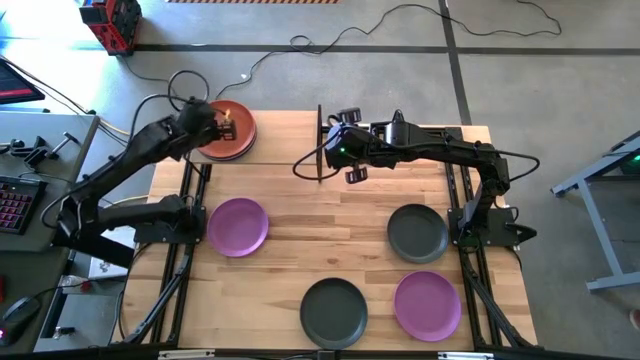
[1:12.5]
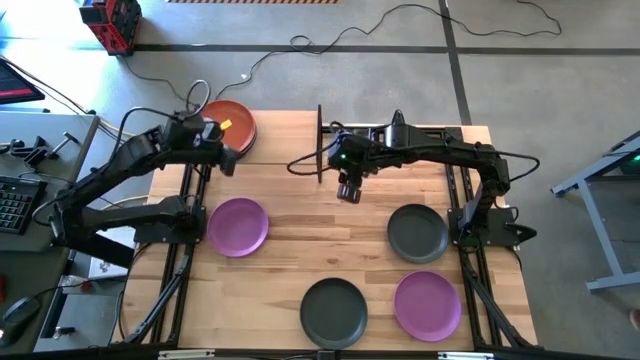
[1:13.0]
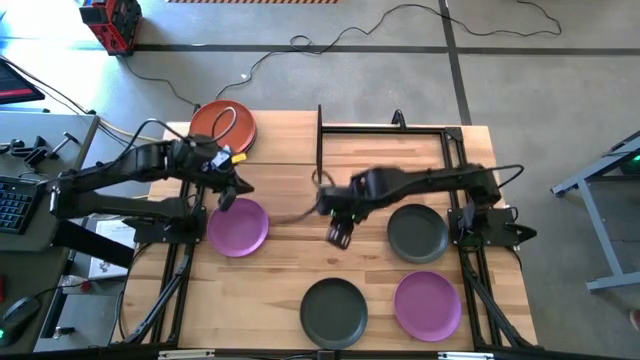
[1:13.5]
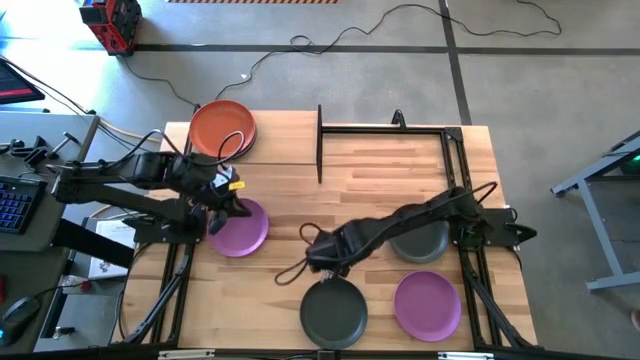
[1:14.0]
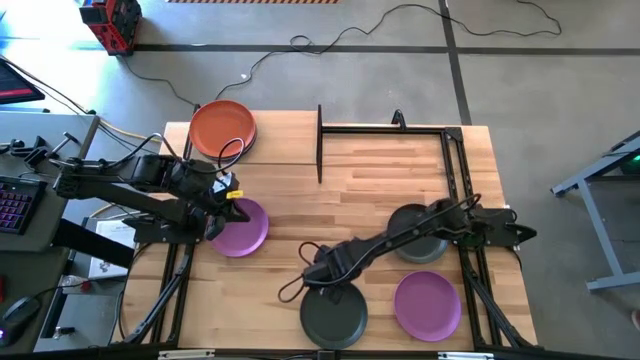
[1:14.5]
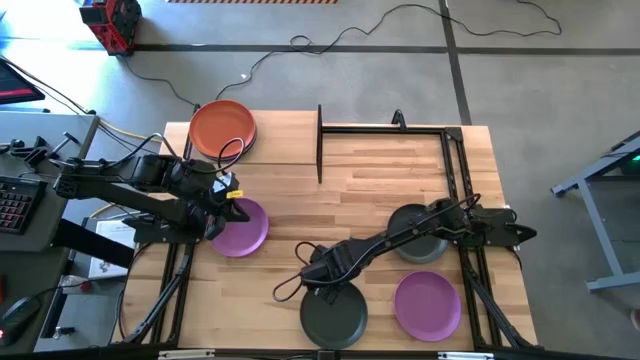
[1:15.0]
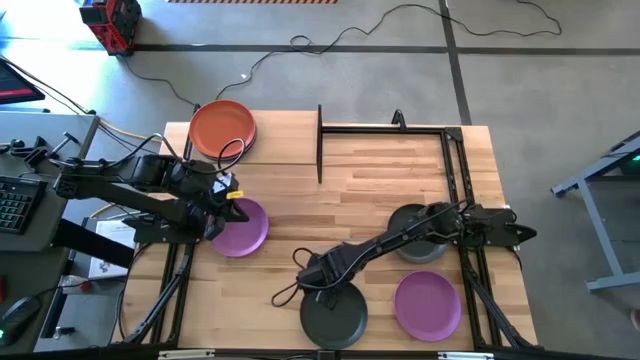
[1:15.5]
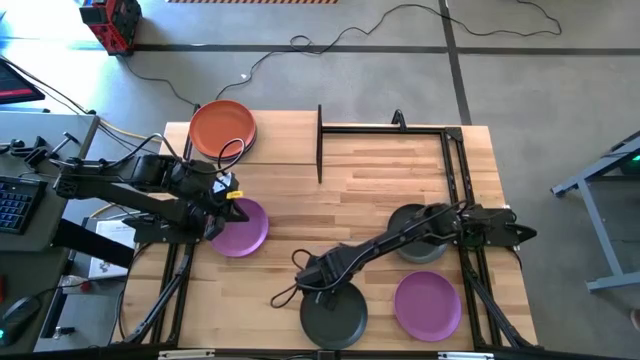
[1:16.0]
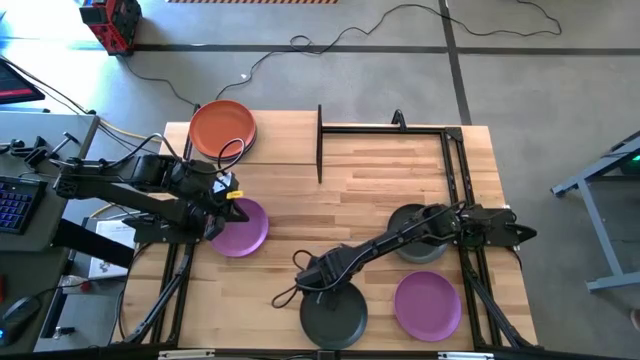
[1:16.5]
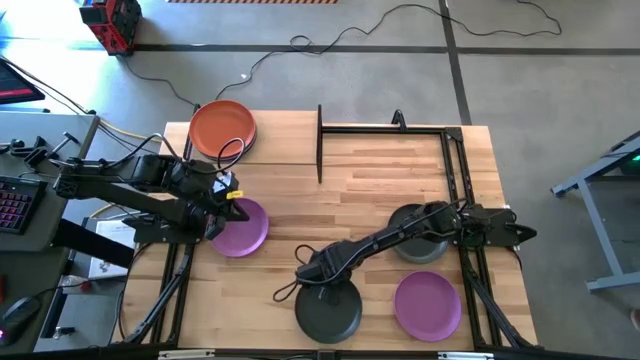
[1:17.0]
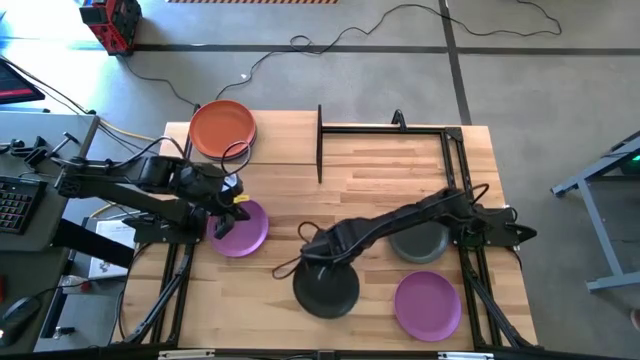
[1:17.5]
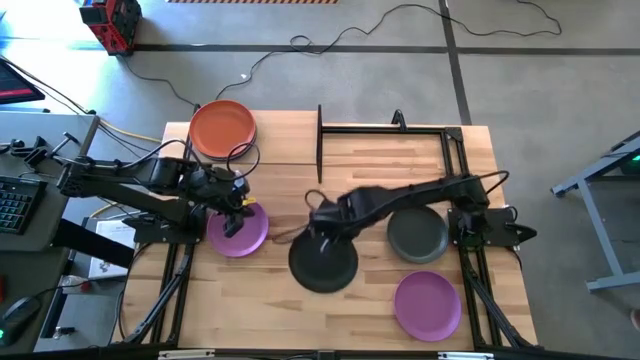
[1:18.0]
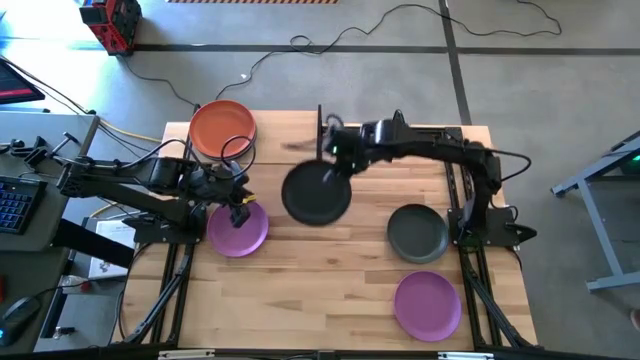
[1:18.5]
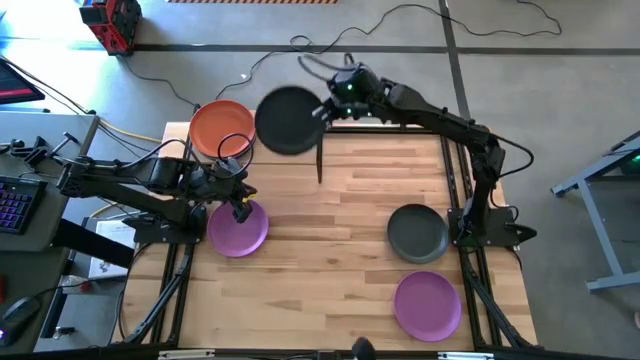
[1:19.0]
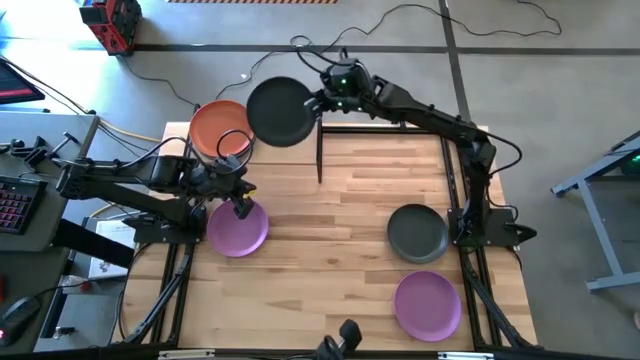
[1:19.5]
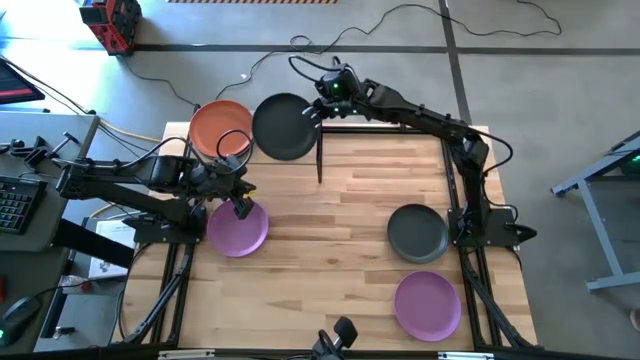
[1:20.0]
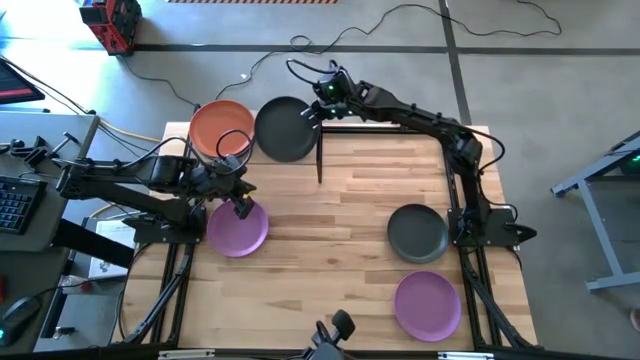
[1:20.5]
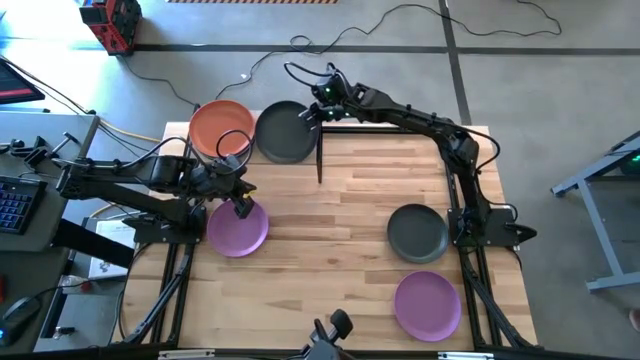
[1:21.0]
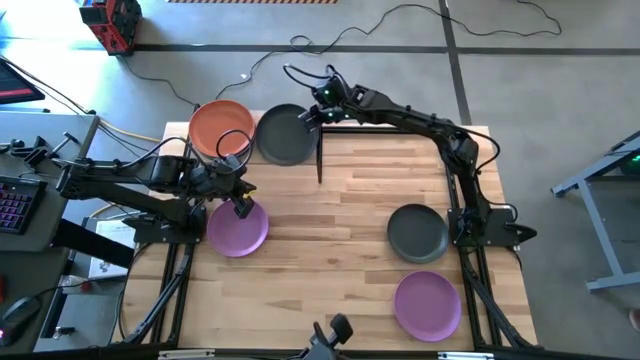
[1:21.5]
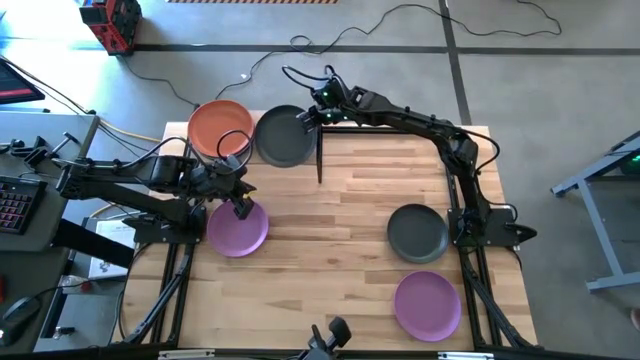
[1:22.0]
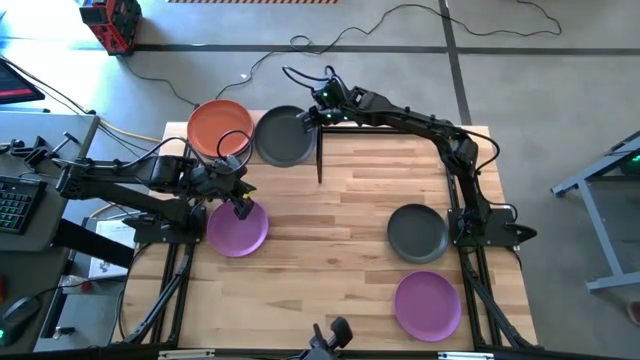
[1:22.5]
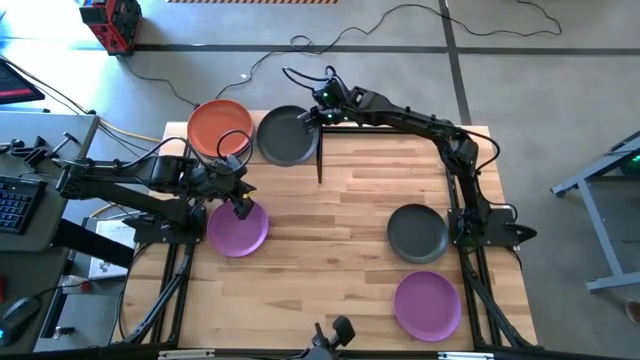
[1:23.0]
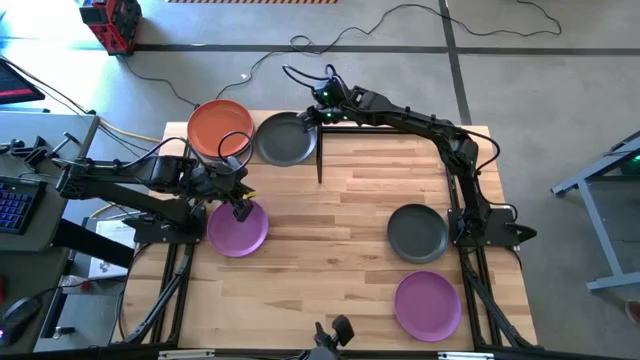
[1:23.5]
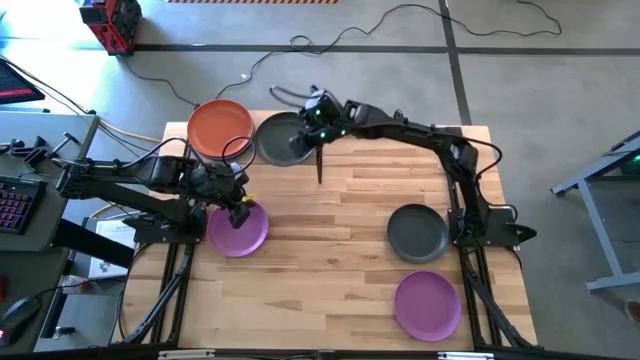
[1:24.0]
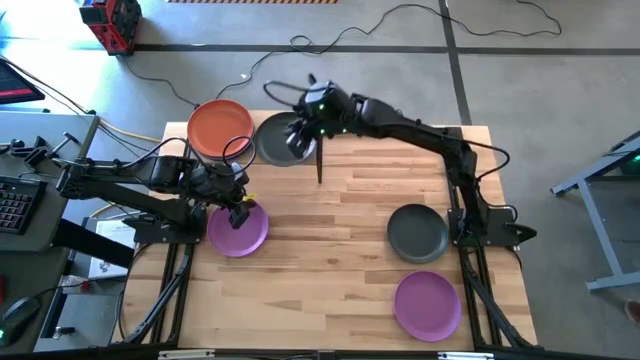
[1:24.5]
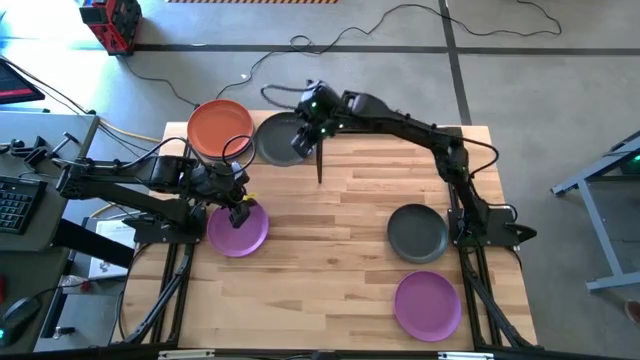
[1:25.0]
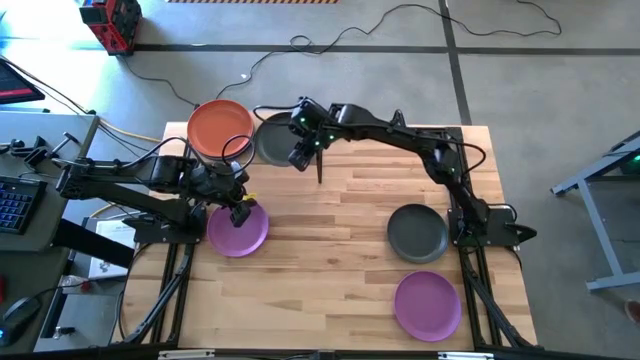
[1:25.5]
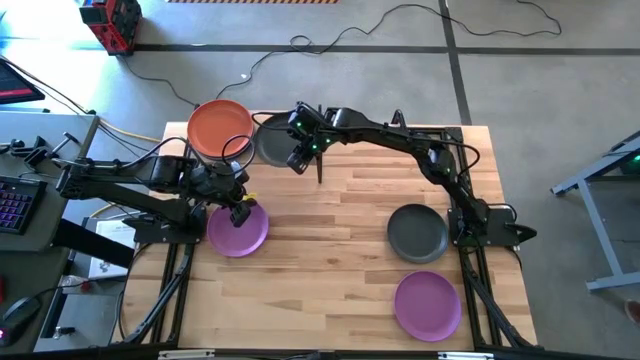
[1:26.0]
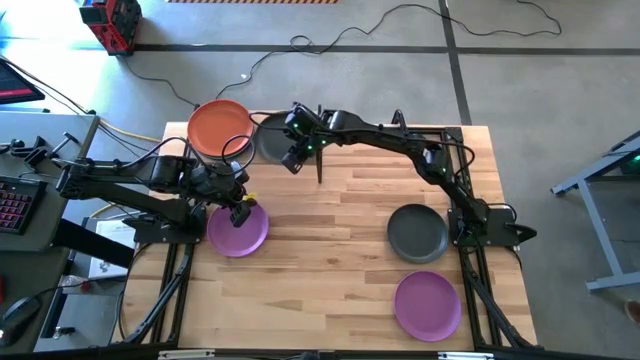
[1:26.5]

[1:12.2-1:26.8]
Task: Place and stack plates onto a shelf
Put the bottom black plate on the shelf

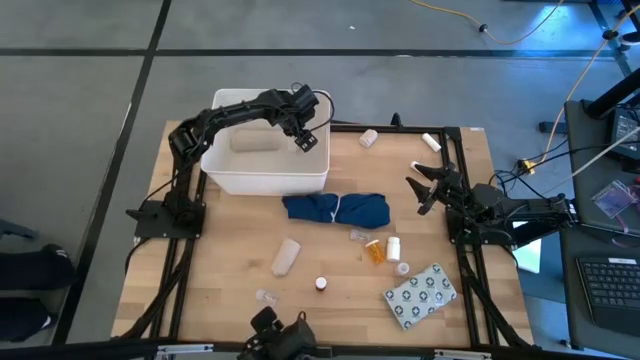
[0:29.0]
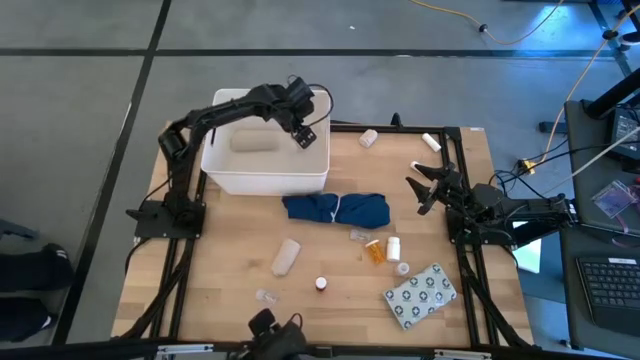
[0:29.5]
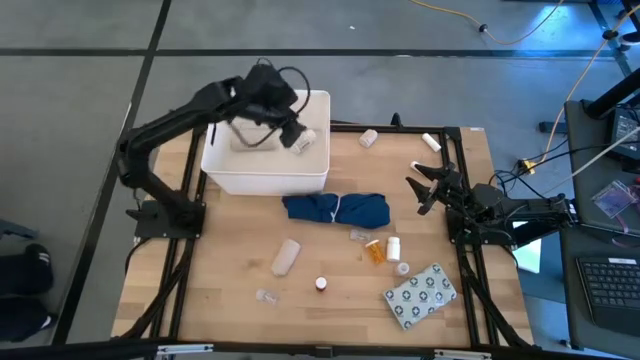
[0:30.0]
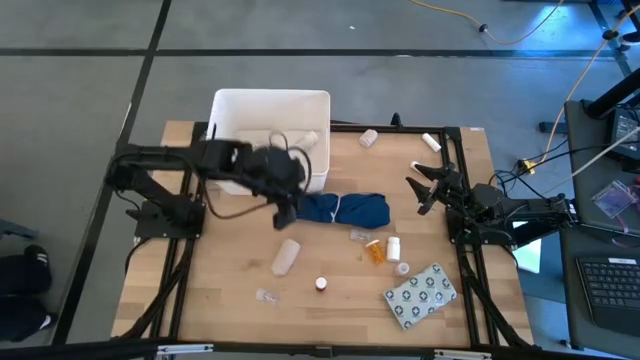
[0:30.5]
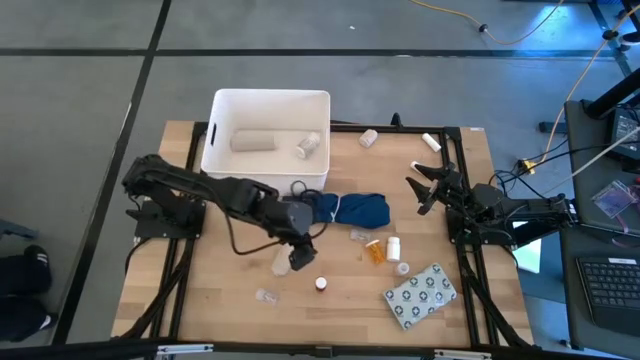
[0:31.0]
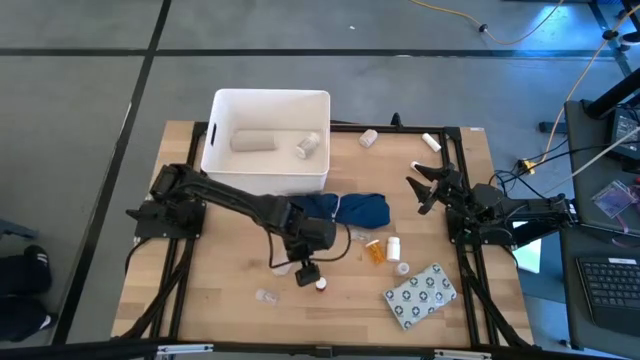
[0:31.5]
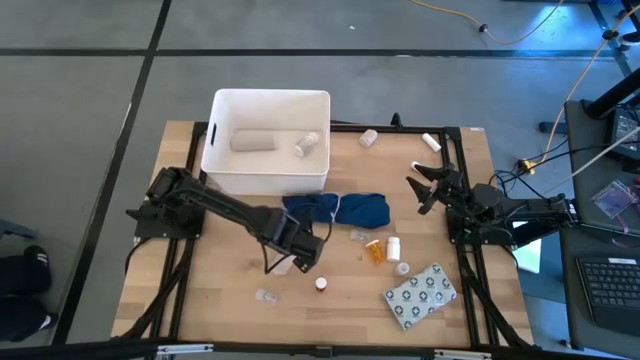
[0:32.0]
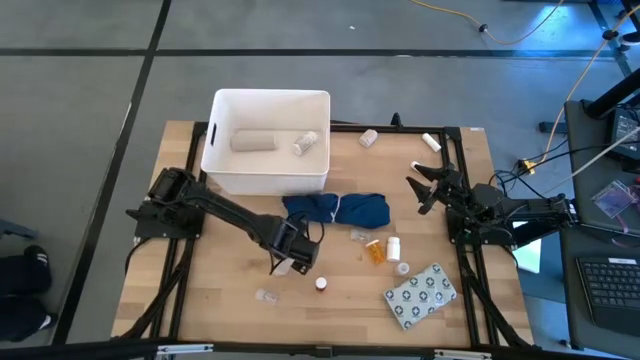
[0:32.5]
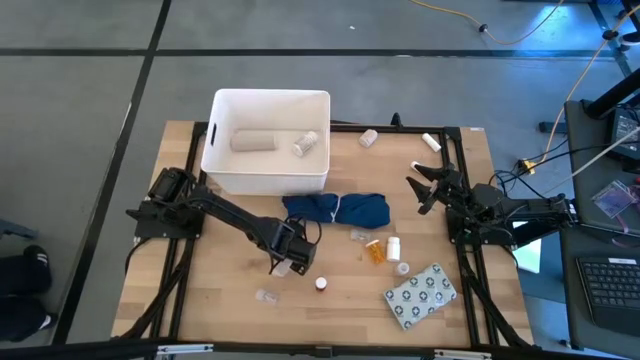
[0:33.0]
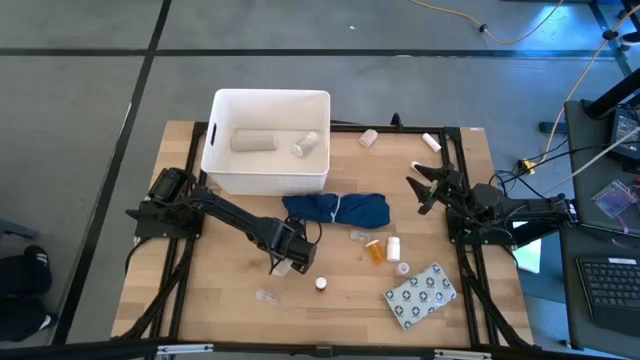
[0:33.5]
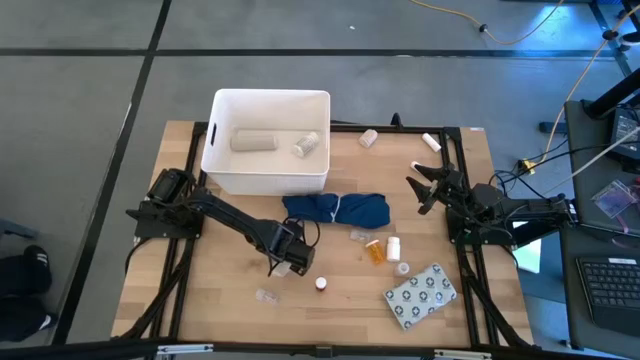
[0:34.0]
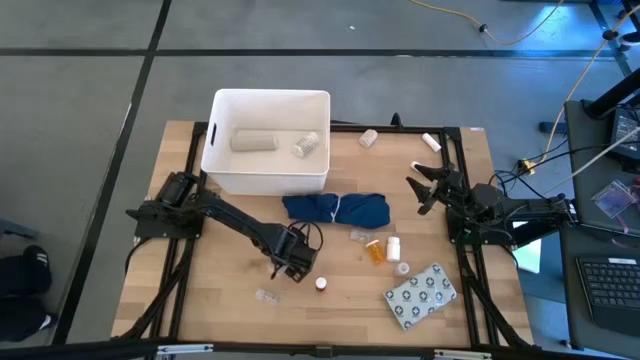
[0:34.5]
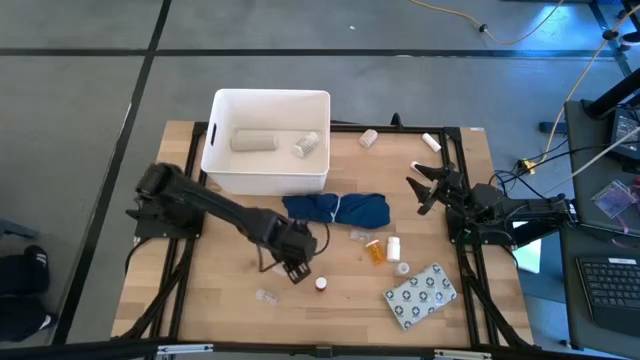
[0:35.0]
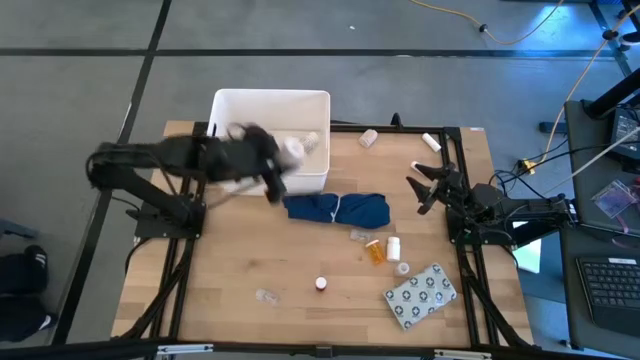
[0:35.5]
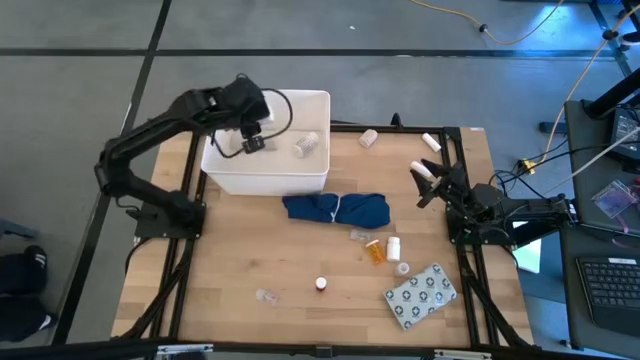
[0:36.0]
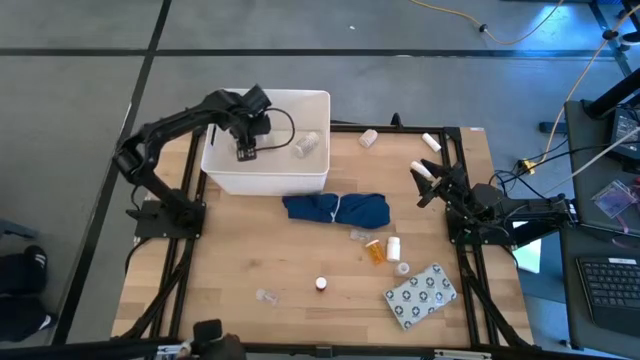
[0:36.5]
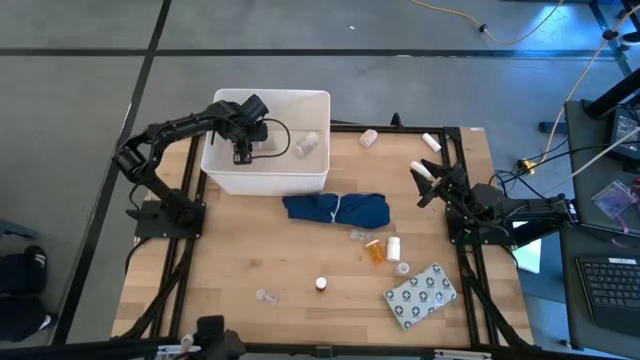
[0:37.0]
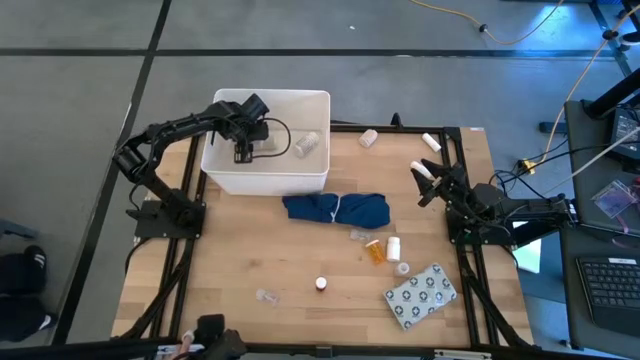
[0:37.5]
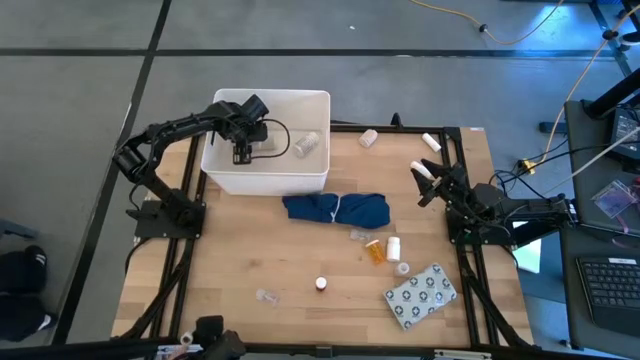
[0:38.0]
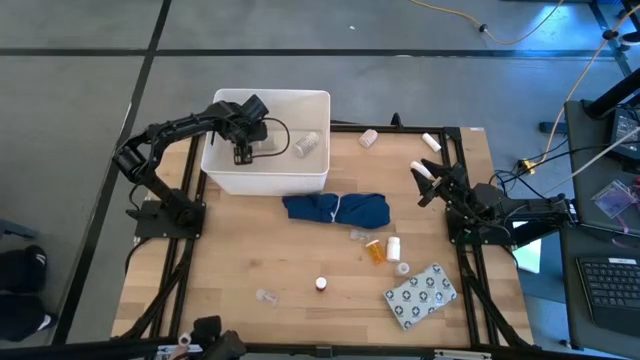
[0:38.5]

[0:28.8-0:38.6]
Task: Pick & place medical supplies in basket/bin
Put the bottom white bandage into the white container
